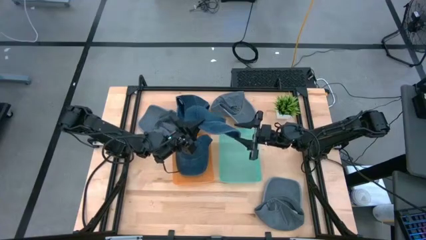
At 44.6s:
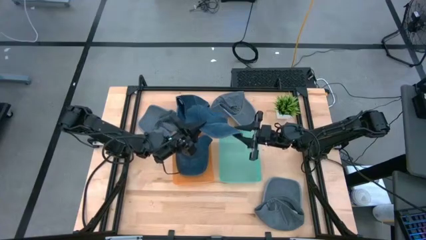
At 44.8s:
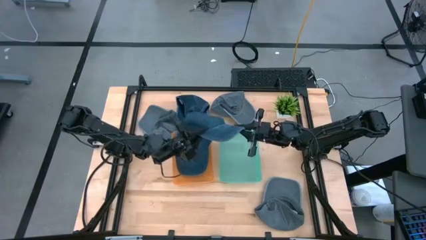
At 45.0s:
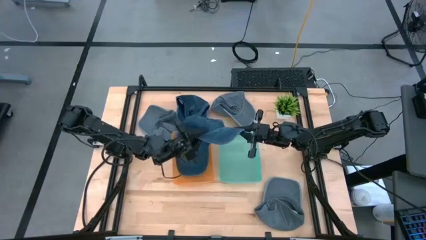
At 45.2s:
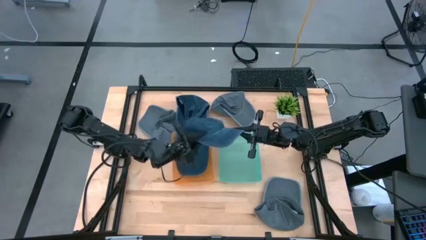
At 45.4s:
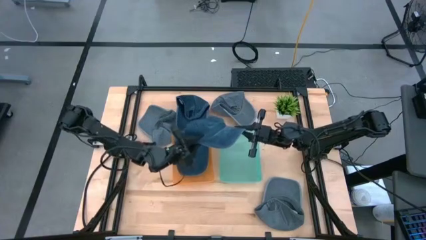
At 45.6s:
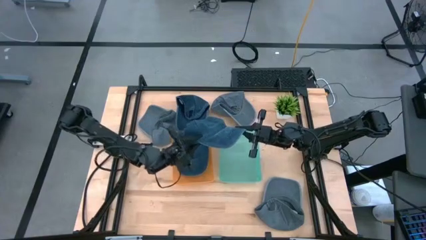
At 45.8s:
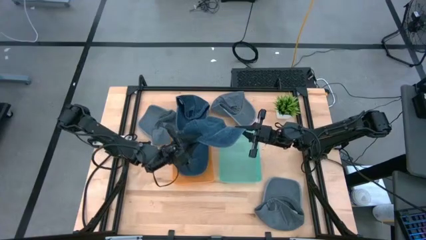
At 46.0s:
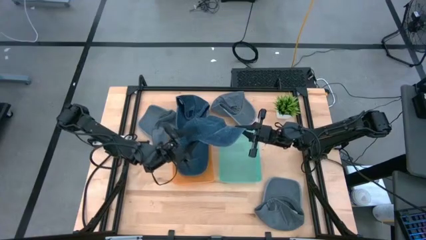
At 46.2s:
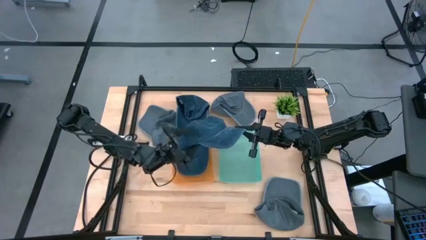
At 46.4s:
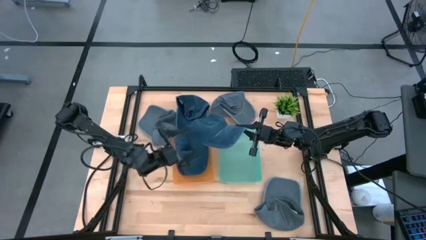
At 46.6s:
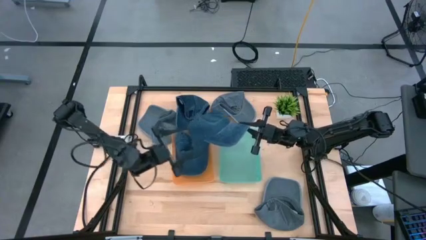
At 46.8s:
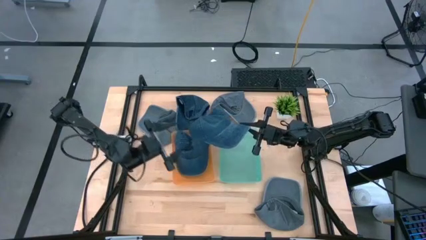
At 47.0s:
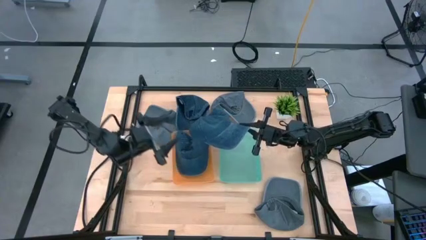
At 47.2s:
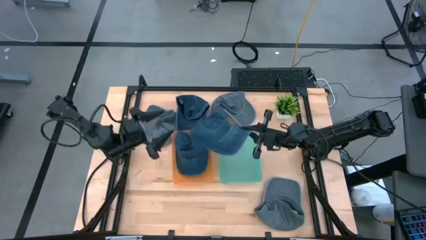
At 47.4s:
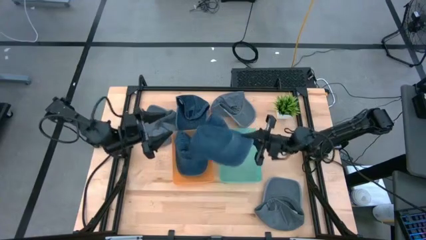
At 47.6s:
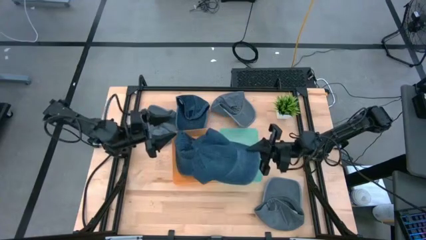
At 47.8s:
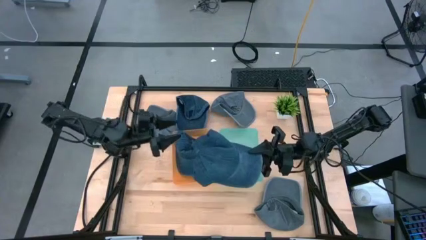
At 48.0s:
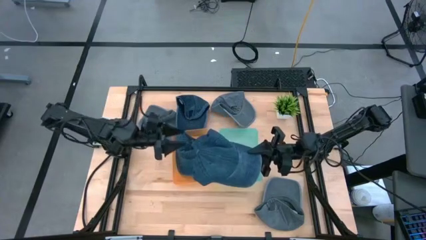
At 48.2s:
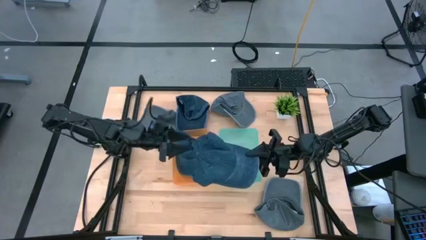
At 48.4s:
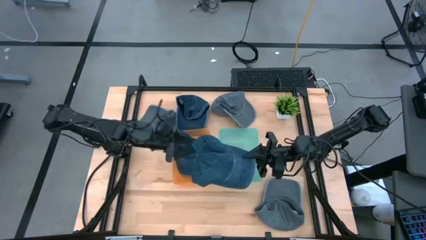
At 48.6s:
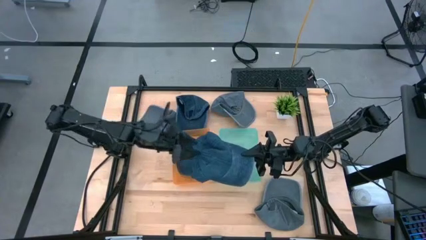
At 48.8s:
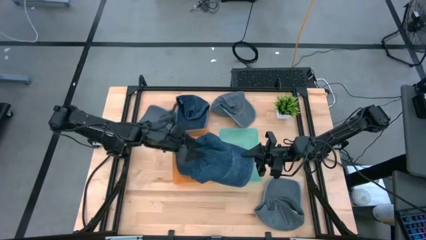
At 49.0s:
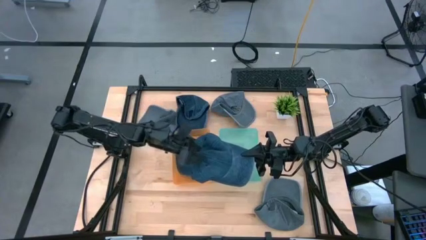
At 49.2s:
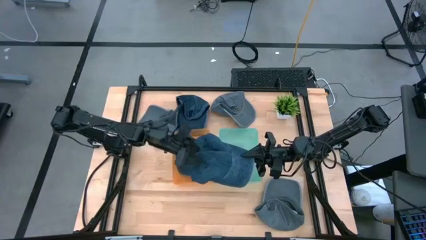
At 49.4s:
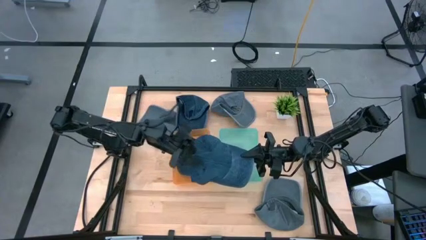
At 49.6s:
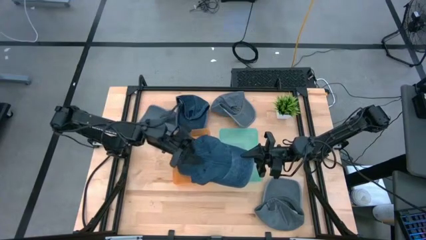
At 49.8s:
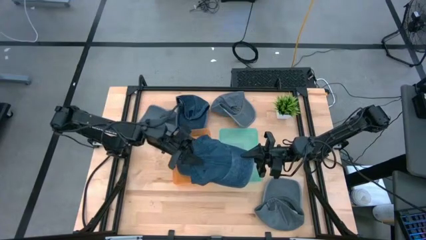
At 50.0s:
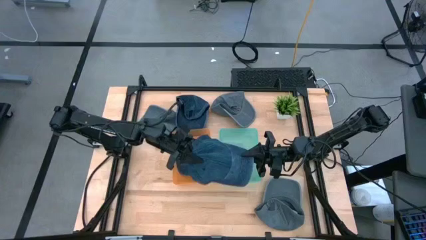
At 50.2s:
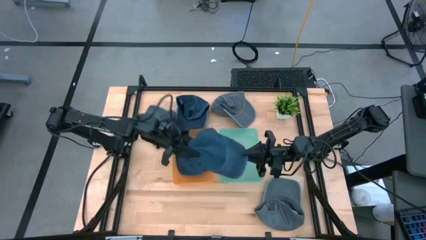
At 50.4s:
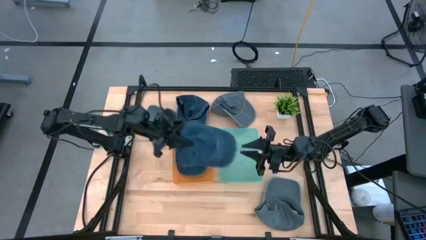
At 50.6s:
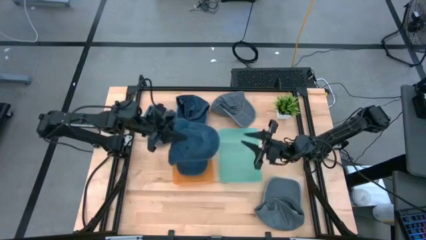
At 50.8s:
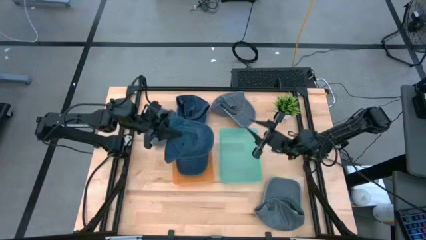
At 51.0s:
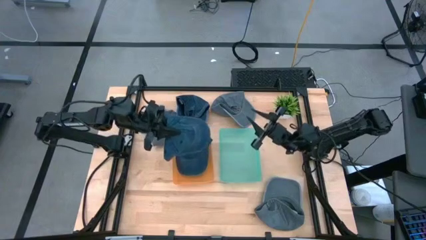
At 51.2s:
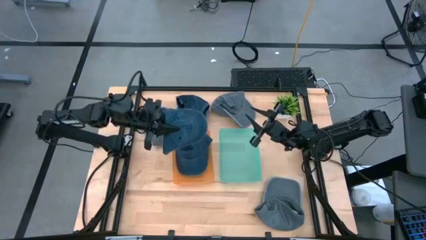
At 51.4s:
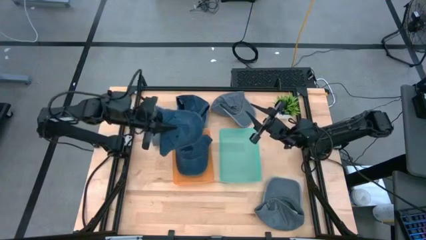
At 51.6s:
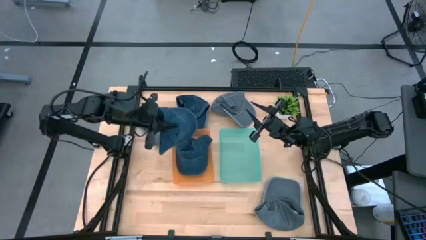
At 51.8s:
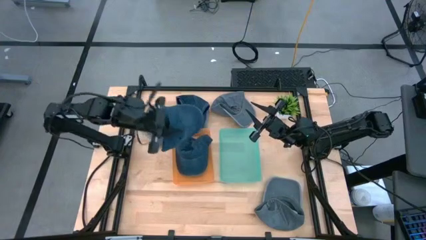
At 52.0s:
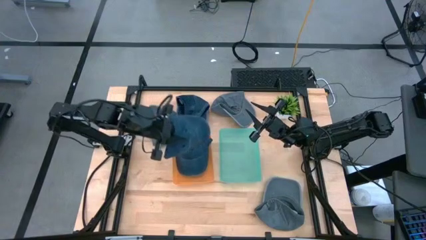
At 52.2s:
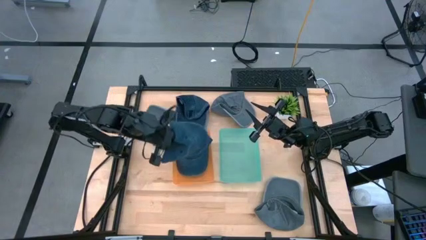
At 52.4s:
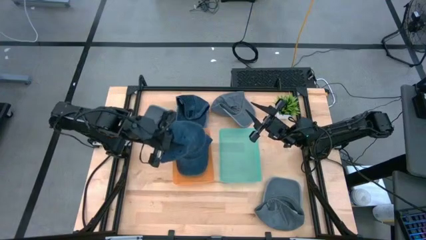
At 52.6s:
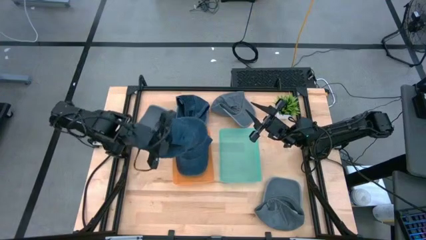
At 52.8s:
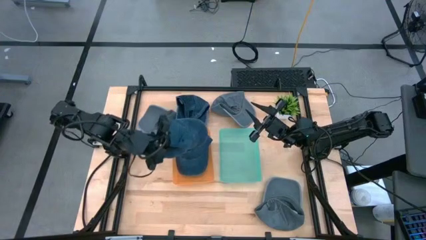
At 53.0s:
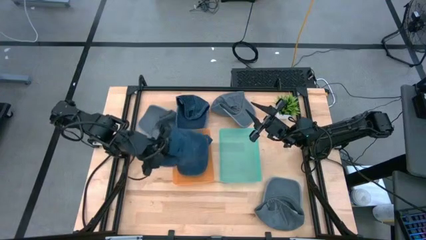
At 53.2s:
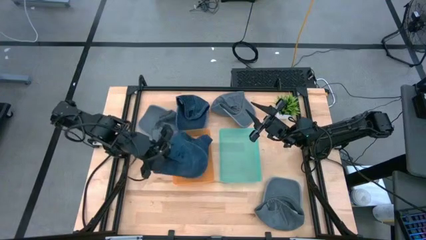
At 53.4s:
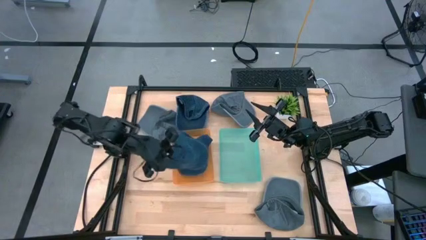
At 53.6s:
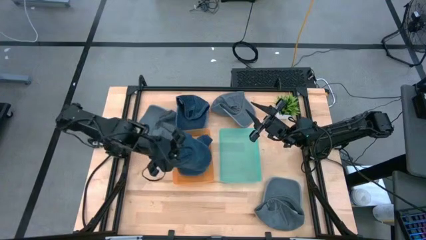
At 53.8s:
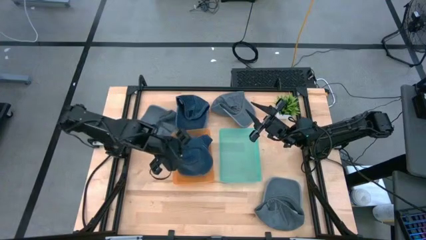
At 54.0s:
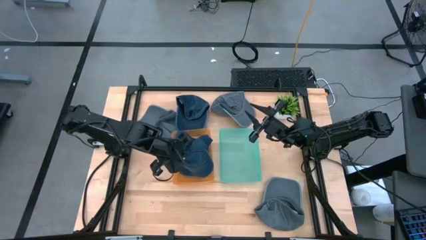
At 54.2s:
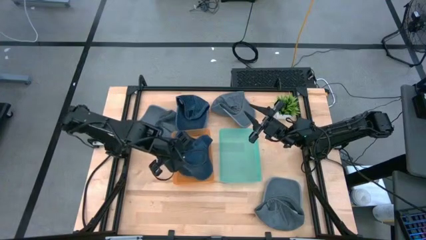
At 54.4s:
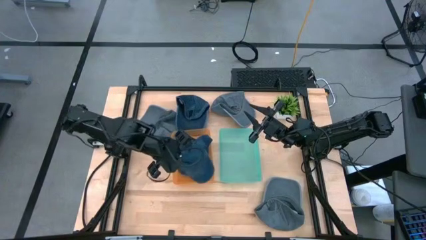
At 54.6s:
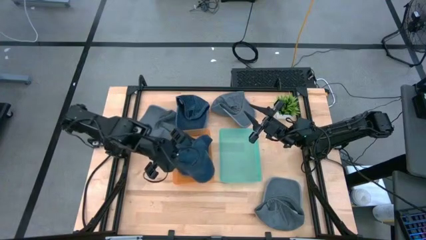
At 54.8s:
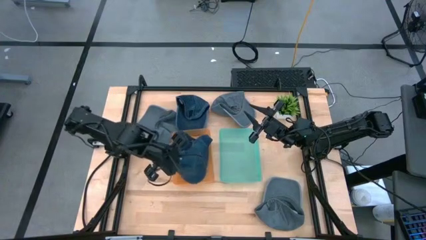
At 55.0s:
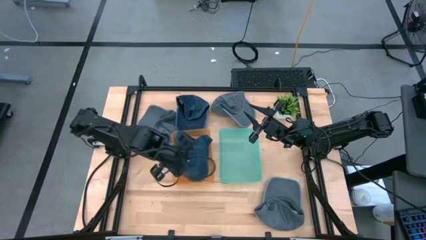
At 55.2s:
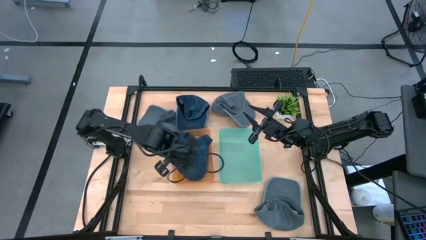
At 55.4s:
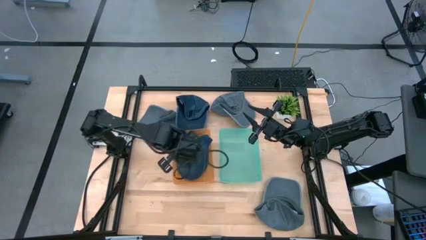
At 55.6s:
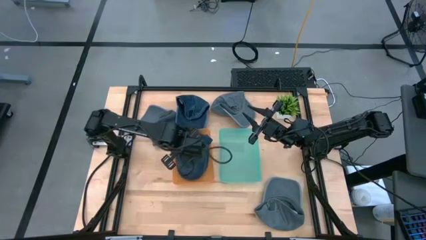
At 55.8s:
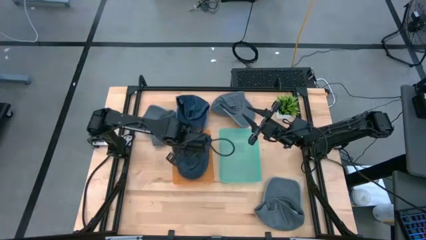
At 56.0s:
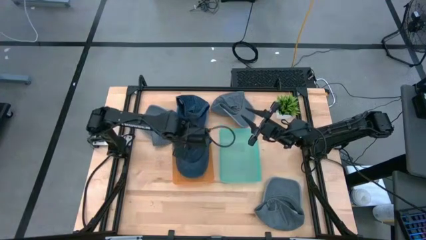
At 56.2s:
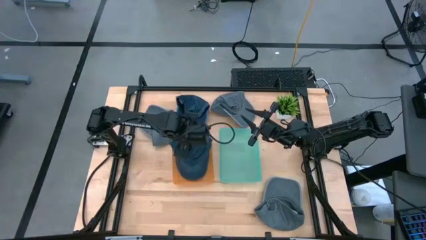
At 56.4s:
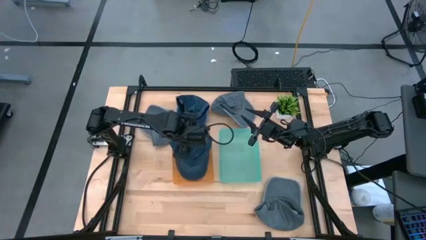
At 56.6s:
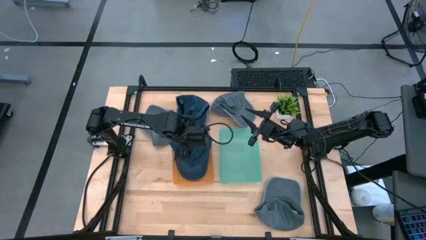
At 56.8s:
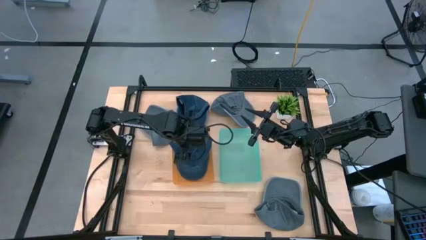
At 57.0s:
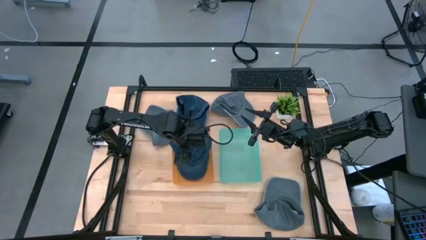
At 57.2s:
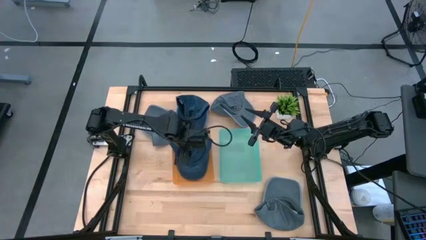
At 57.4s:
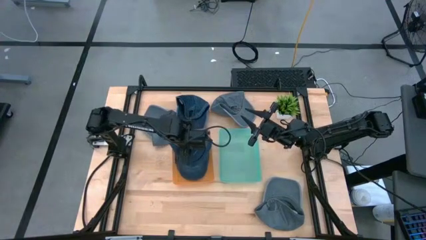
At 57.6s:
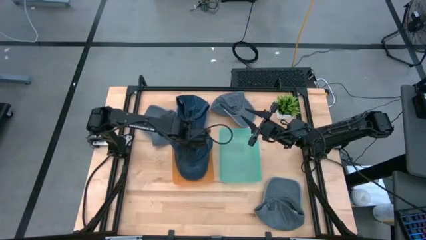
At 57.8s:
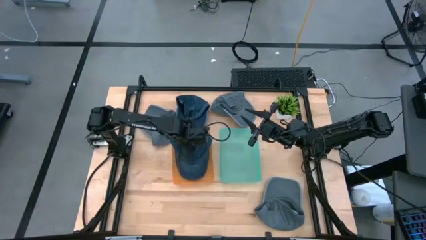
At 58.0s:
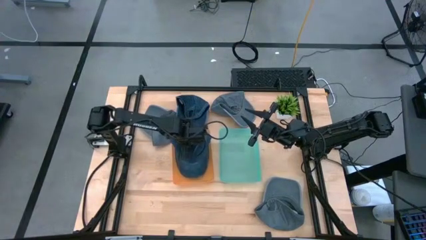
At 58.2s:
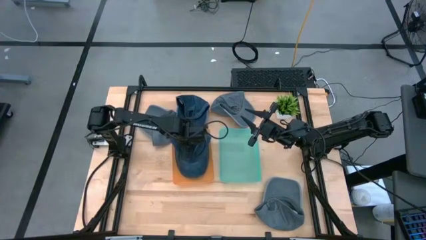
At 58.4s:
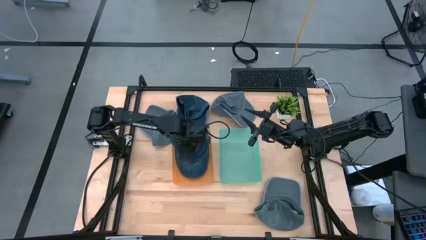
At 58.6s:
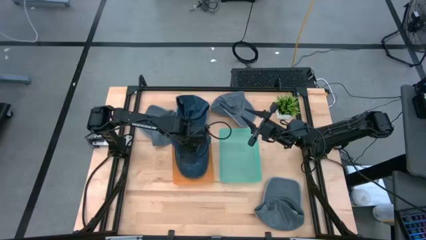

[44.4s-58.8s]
Task: Pick & Place hat
Put the bottom blue cap into the orange bin

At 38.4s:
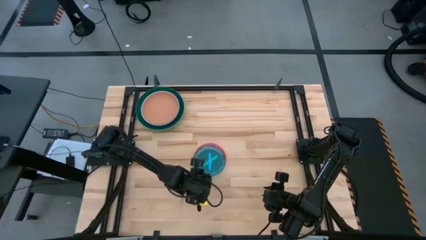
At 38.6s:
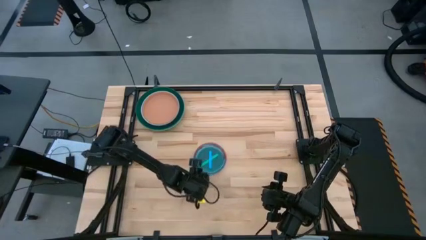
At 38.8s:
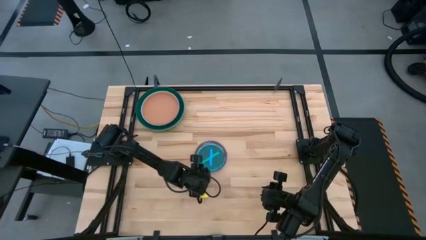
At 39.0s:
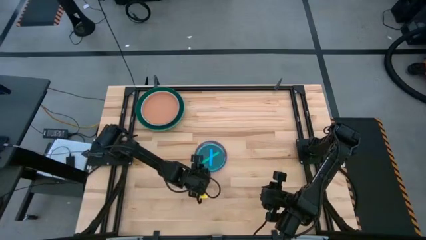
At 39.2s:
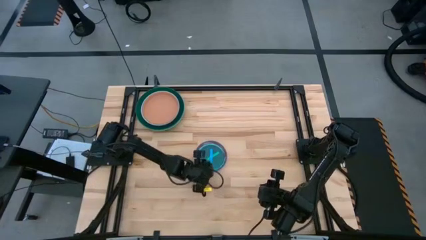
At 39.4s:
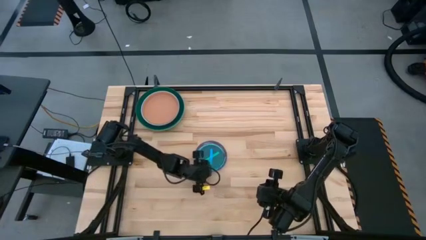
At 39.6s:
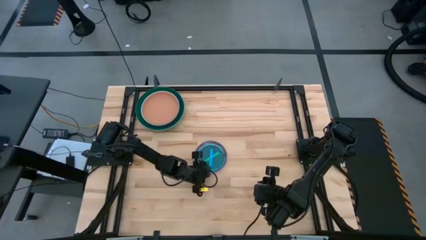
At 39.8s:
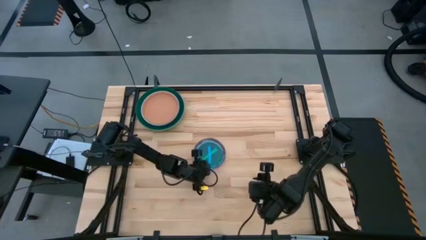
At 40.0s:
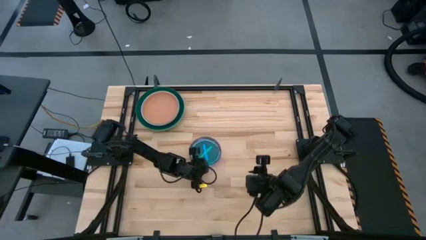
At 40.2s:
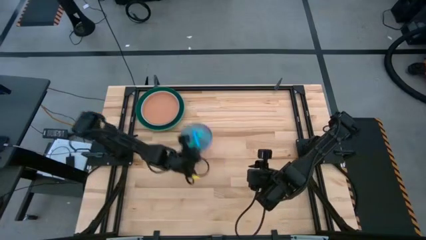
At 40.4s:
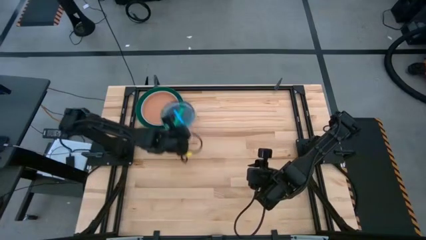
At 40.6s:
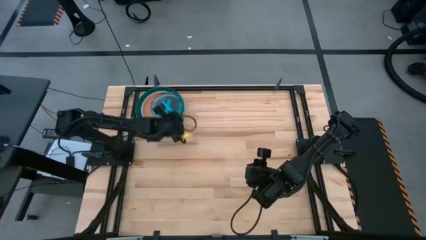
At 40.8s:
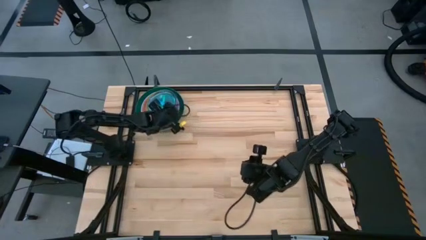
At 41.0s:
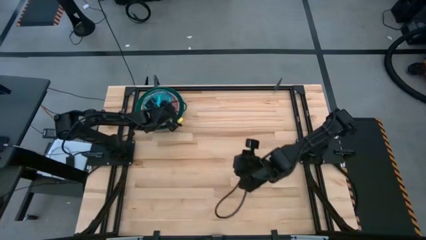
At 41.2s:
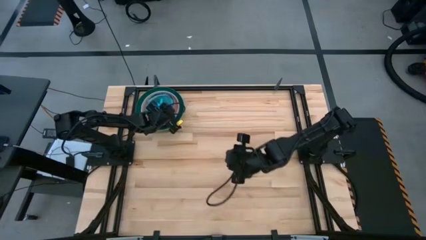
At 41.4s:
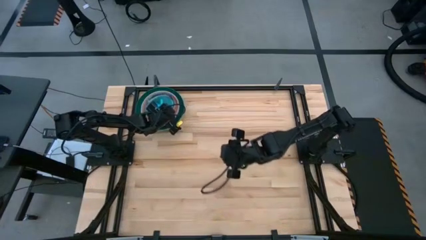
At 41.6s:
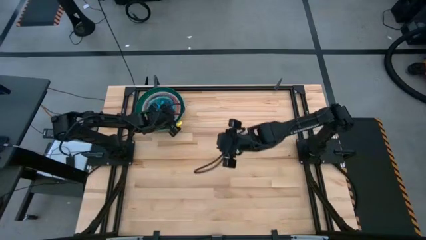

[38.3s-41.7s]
Task: Stack plastic plates
Stack the stacked plates on top of the orange plate
